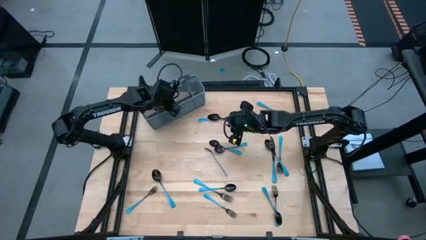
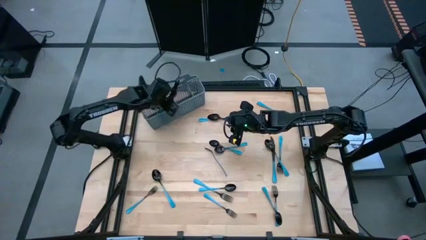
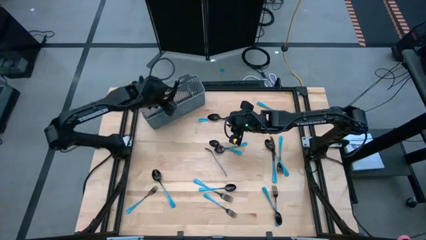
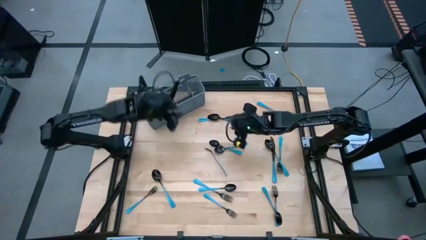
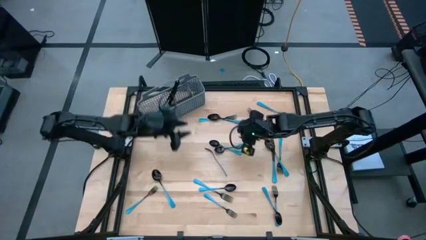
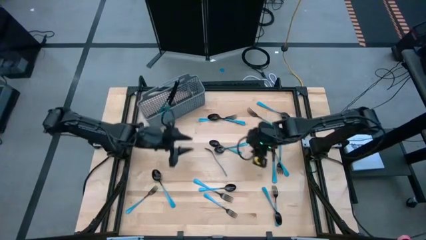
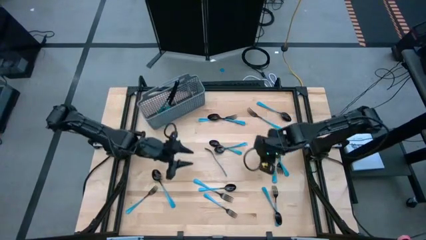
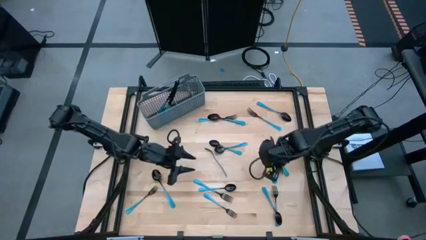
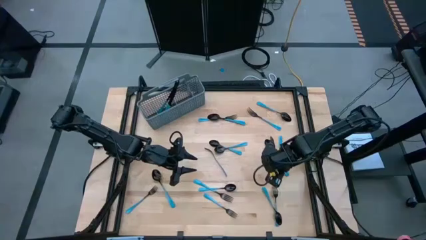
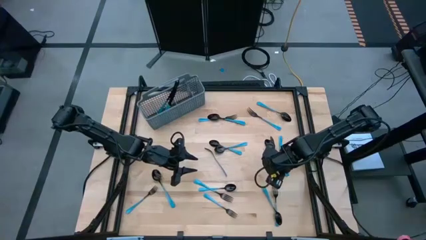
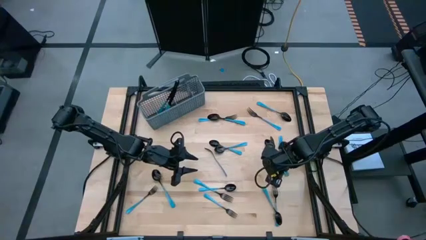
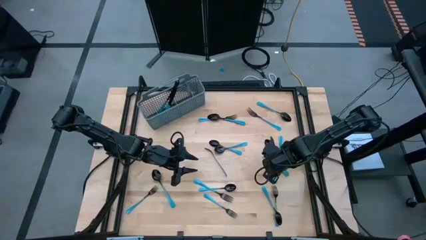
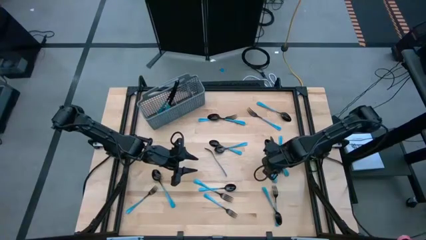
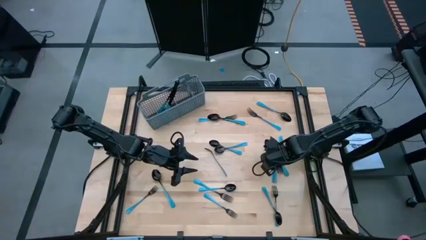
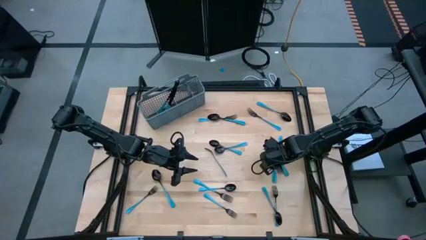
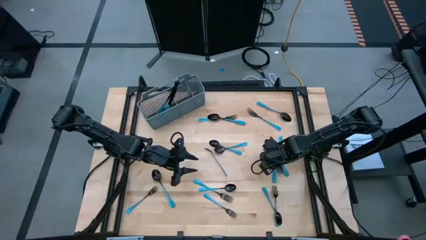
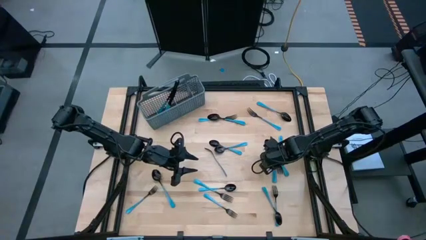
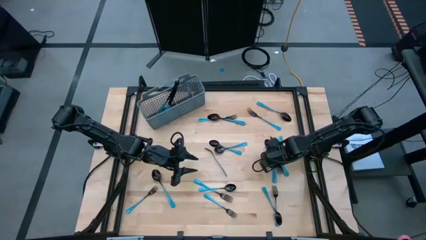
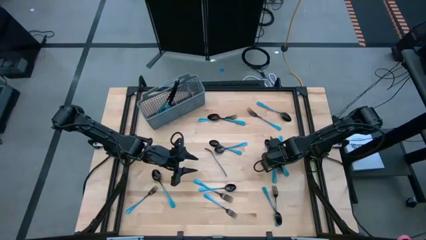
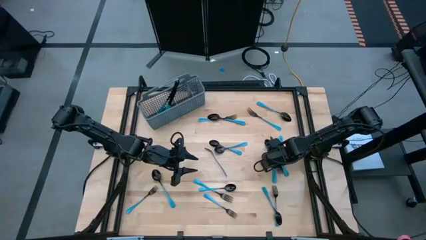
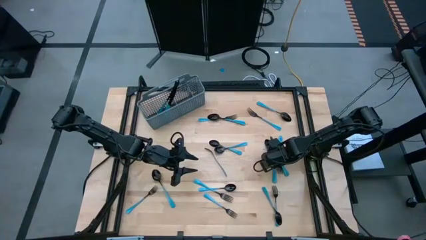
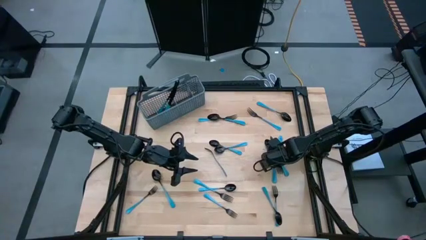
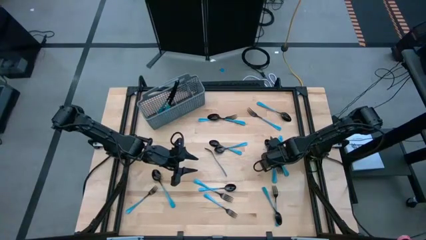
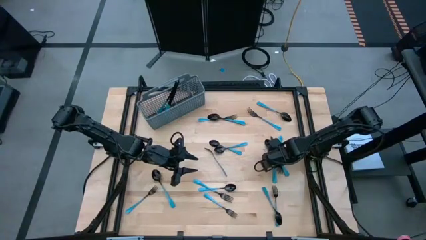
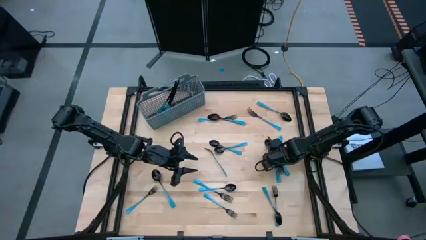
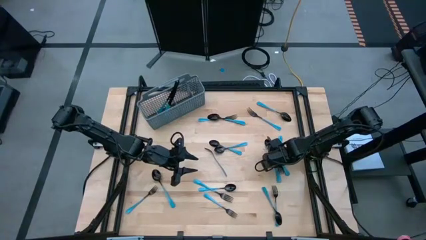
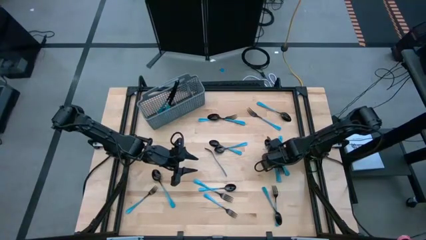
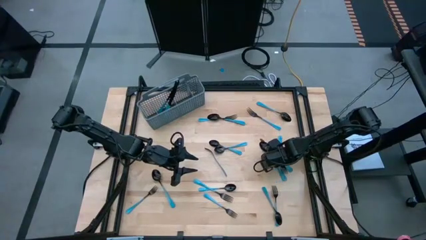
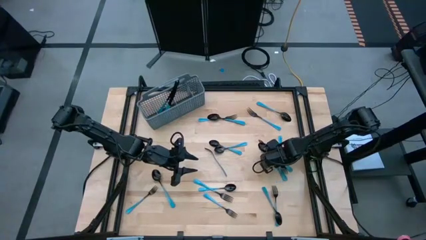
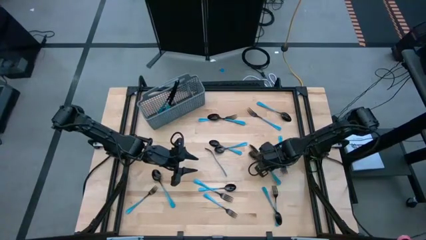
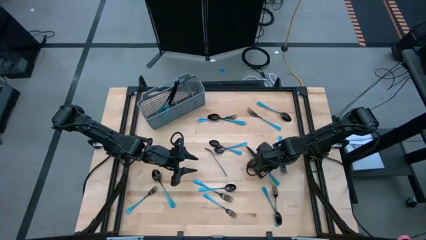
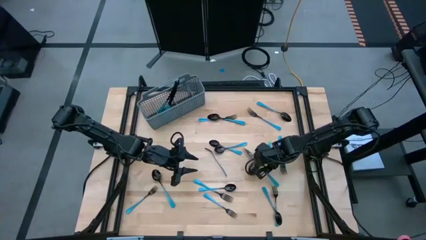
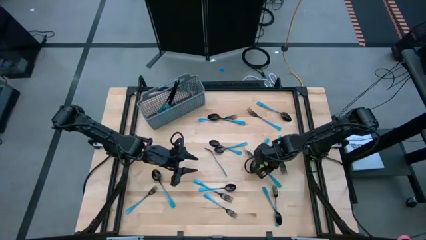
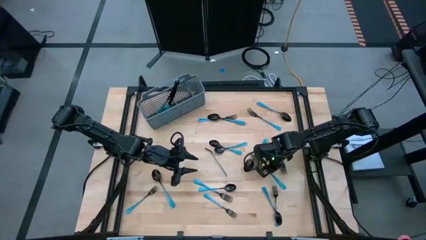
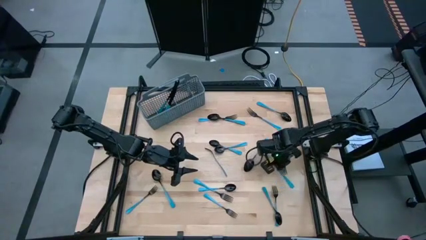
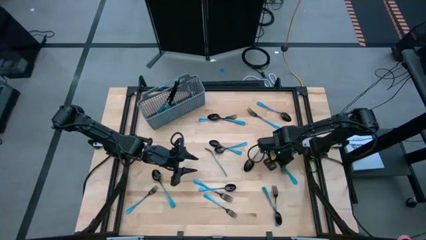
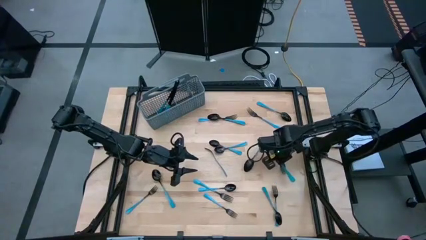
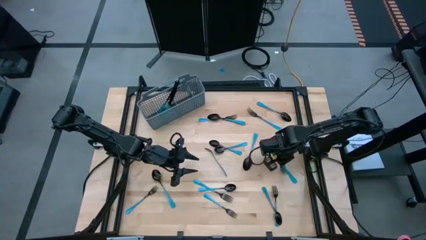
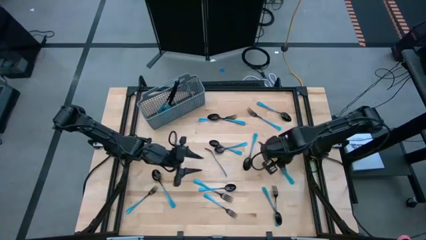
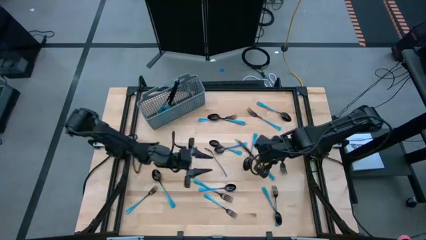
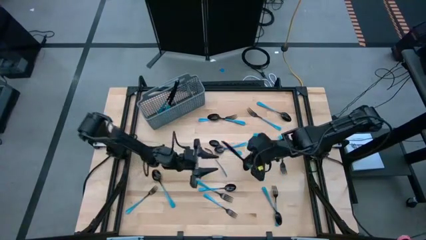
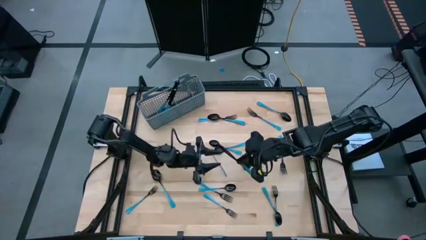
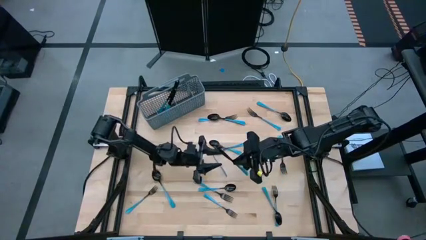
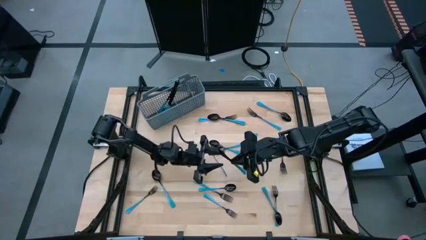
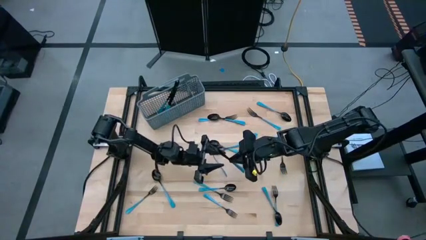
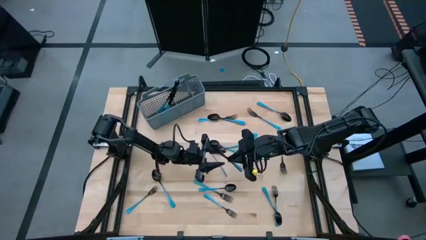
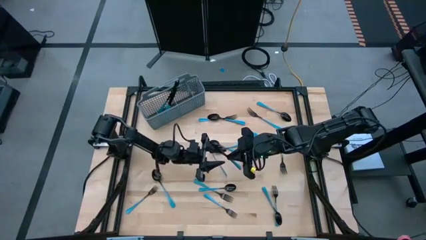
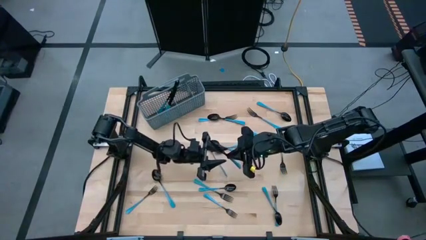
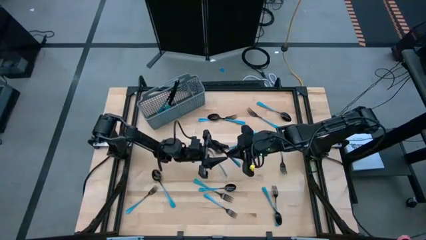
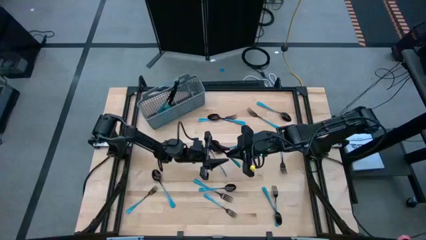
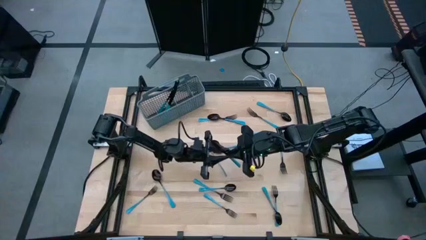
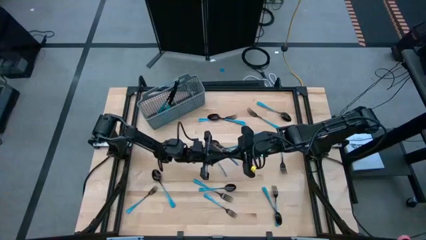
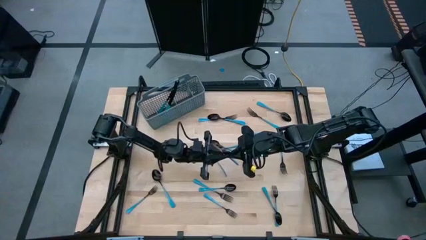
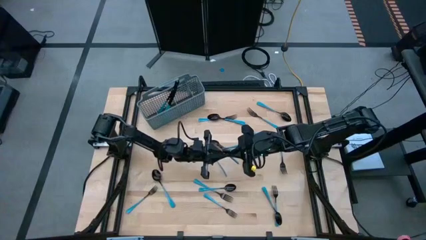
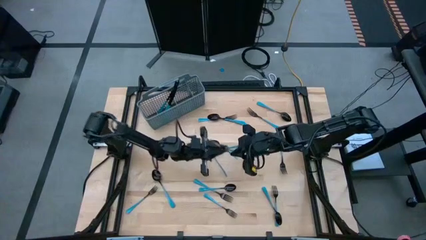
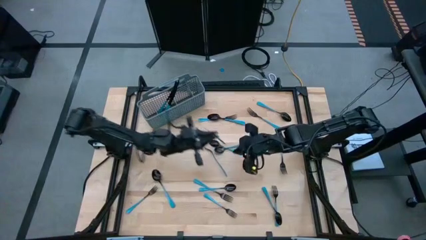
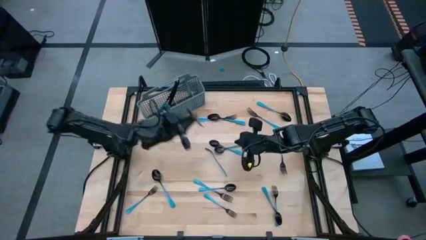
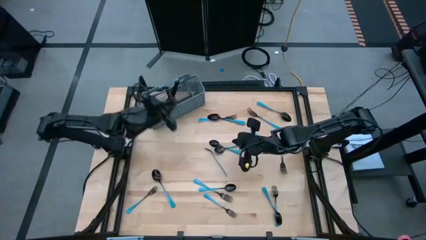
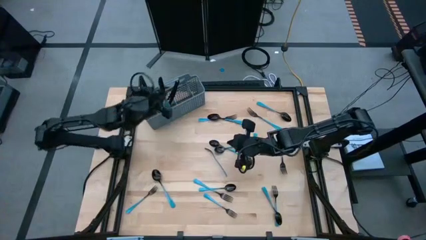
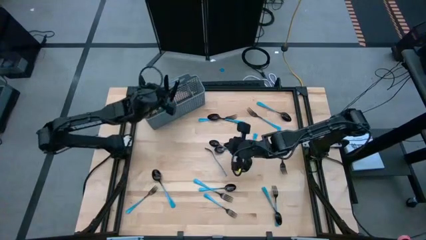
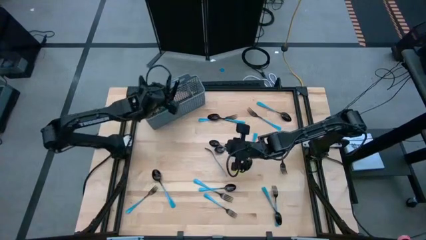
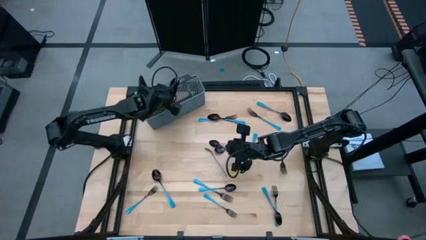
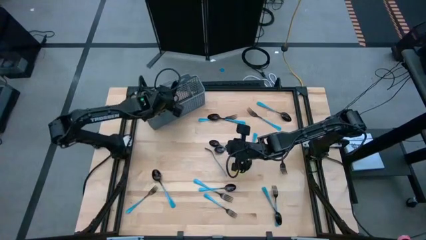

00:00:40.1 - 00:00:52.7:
Task: Sort silverware
Put the blue knife into the silverware rack
